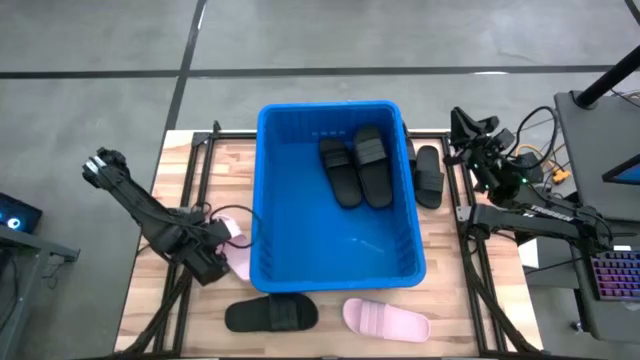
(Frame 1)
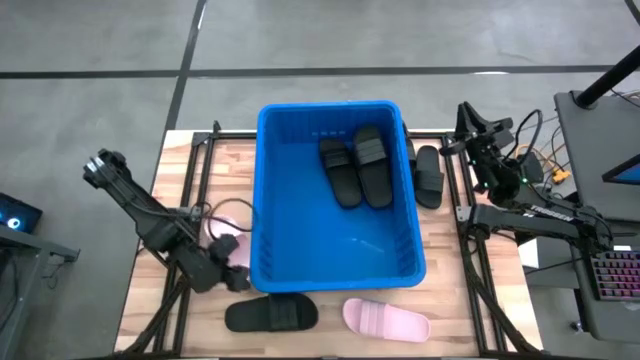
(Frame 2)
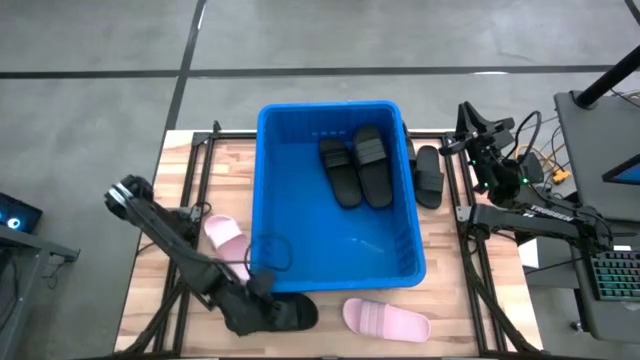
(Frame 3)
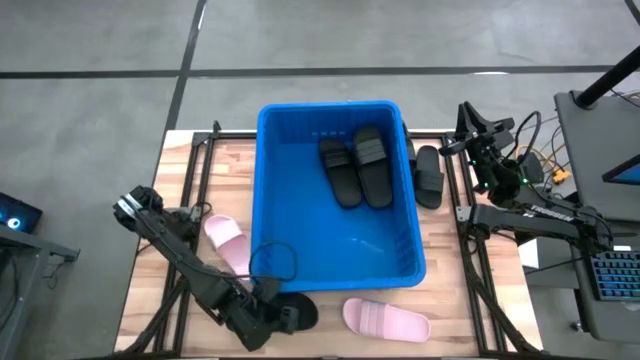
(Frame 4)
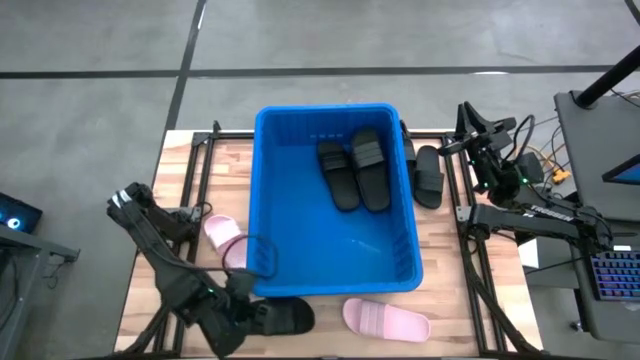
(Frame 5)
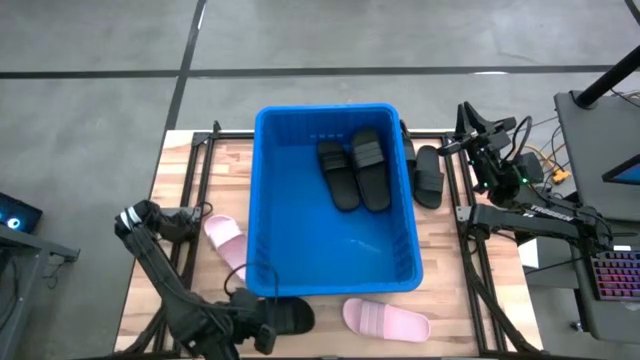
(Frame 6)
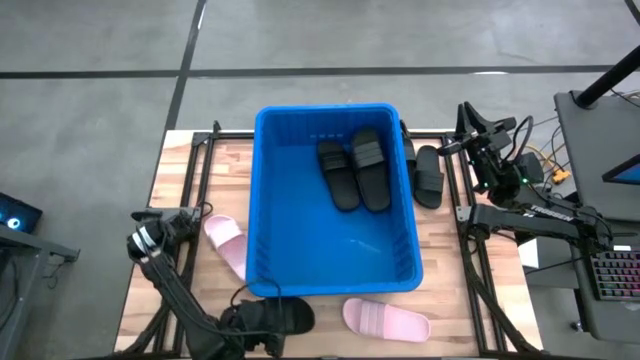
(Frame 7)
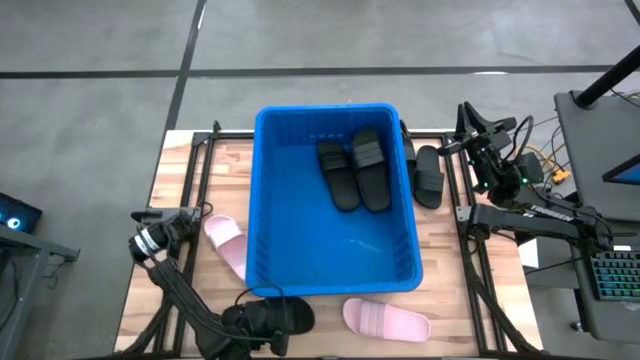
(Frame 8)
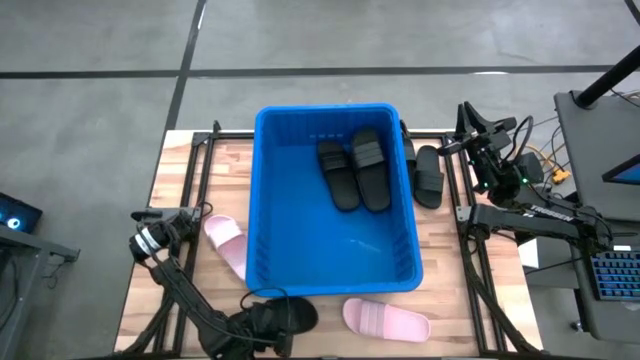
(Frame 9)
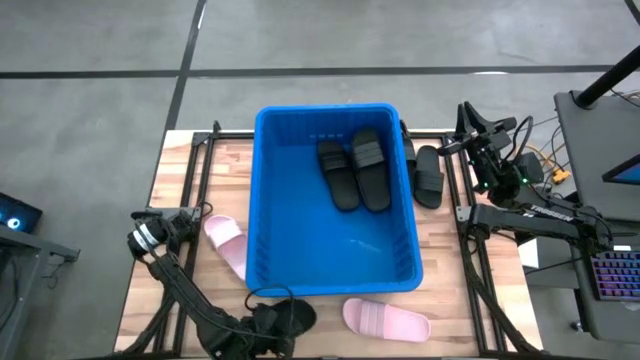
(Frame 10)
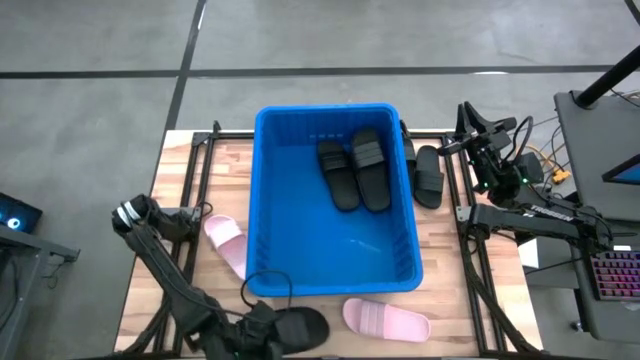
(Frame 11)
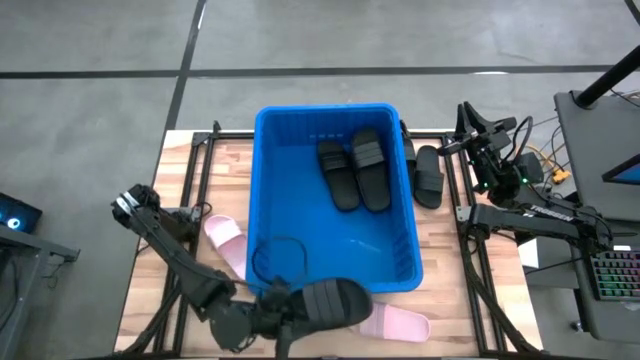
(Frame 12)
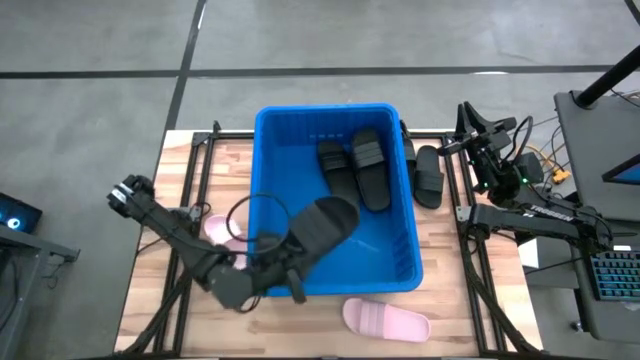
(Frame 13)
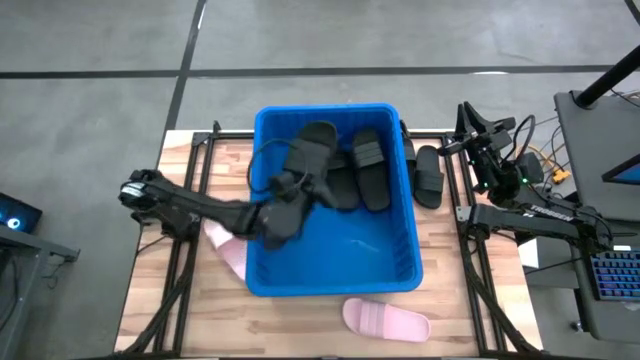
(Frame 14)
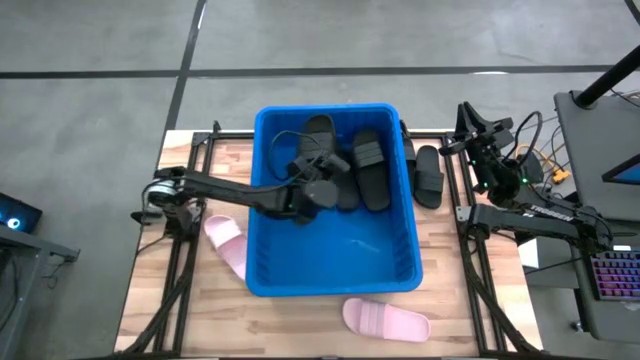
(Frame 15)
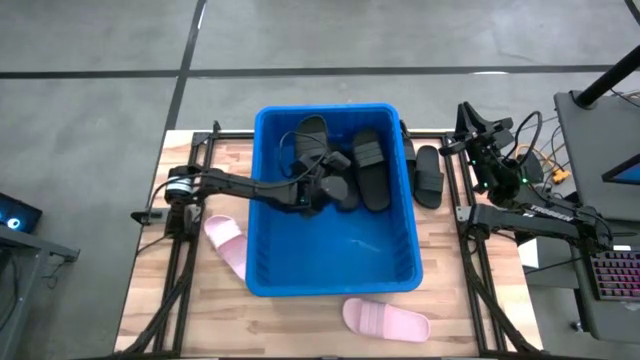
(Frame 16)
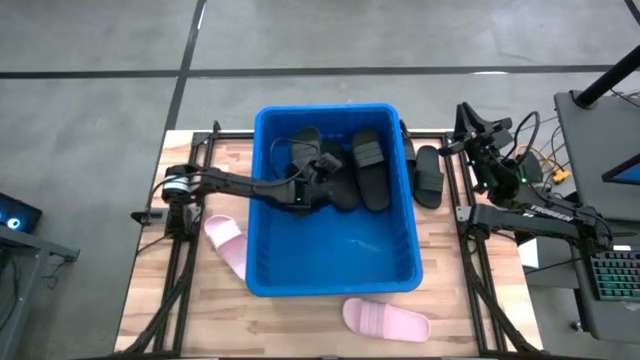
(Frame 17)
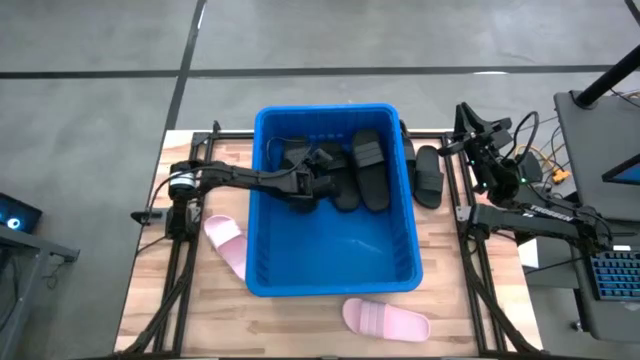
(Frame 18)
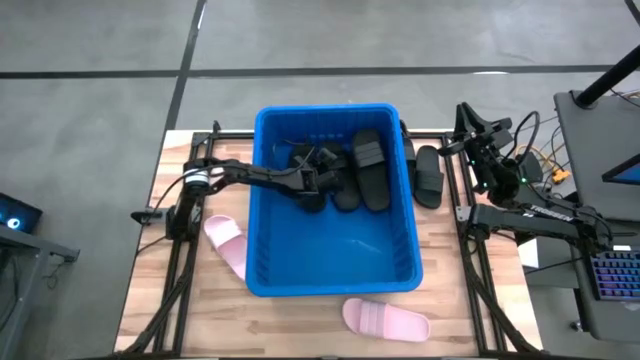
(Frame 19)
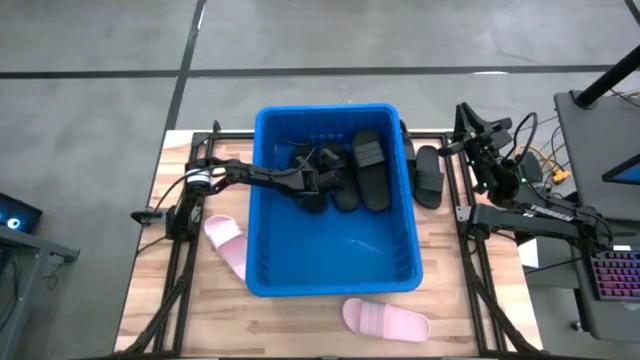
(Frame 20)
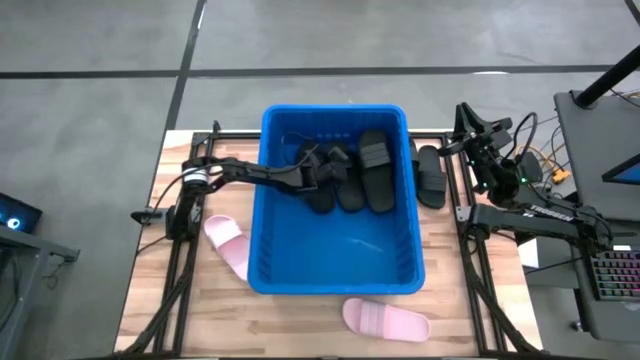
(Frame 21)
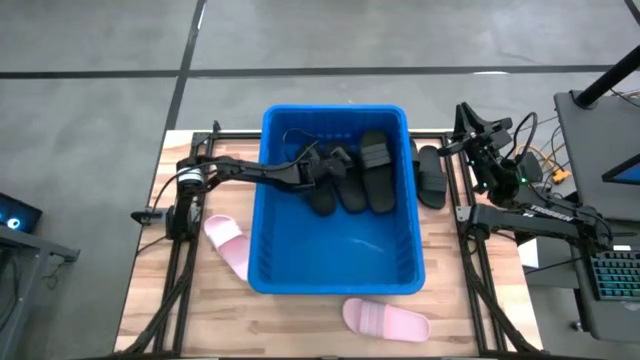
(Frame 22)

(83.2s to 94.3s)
Task: Pick and place slides into bin
Put the black slides into the blue organizer bin
